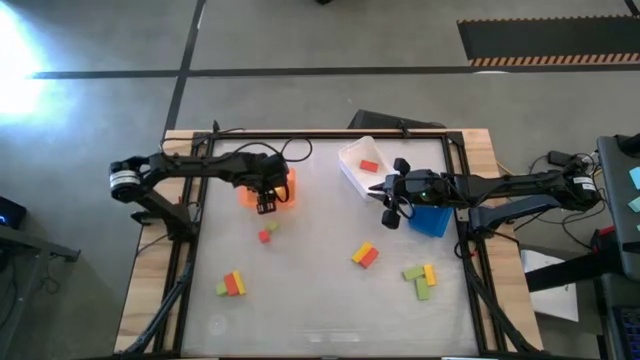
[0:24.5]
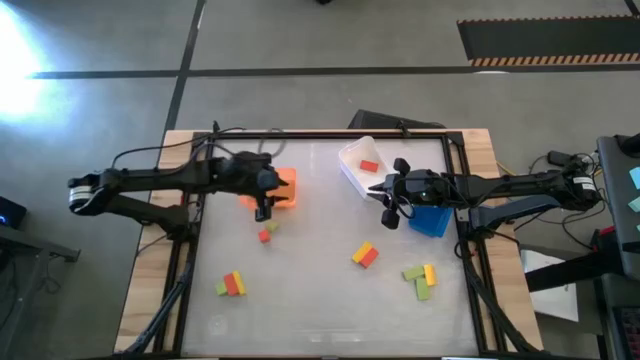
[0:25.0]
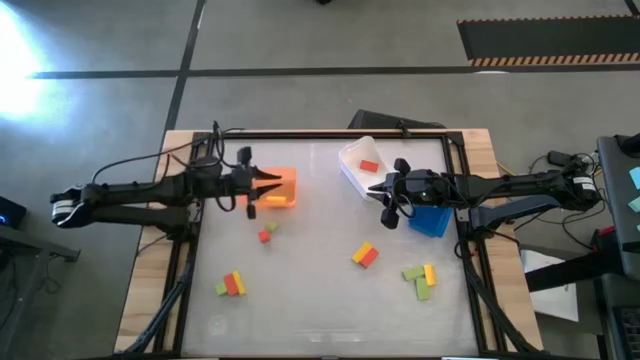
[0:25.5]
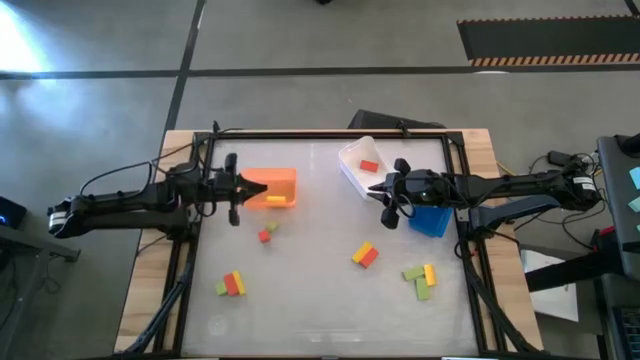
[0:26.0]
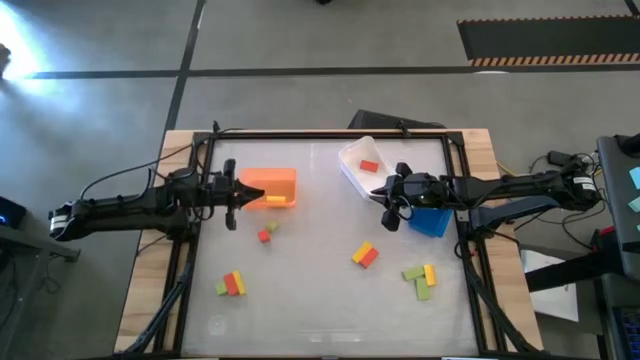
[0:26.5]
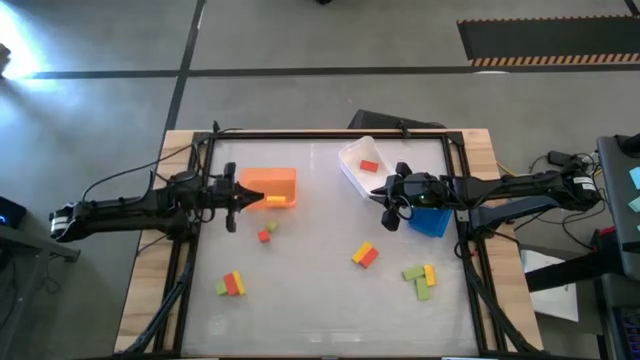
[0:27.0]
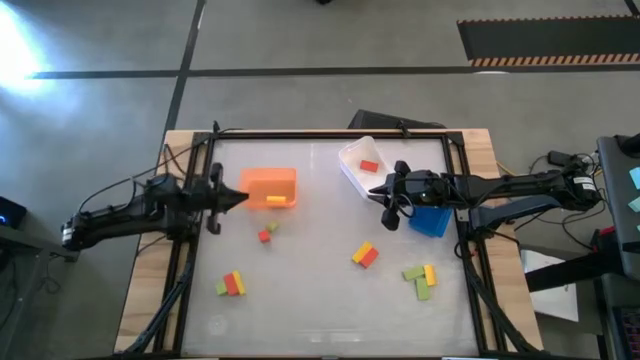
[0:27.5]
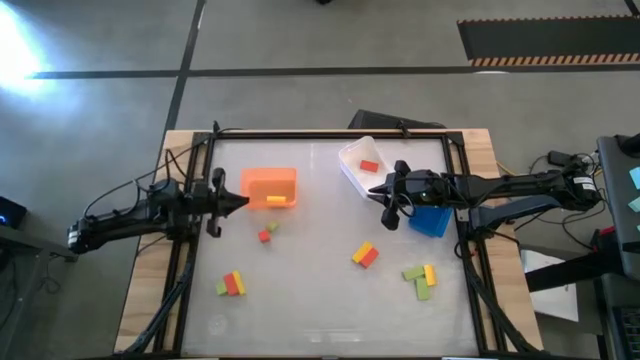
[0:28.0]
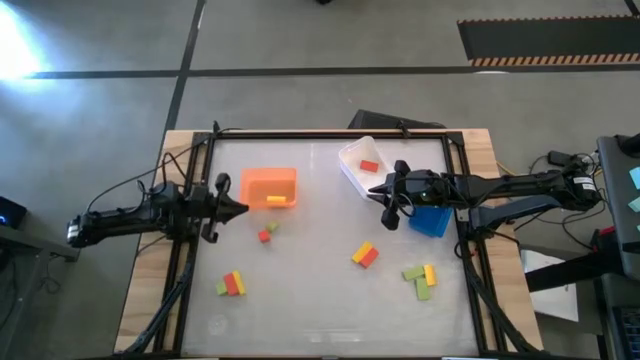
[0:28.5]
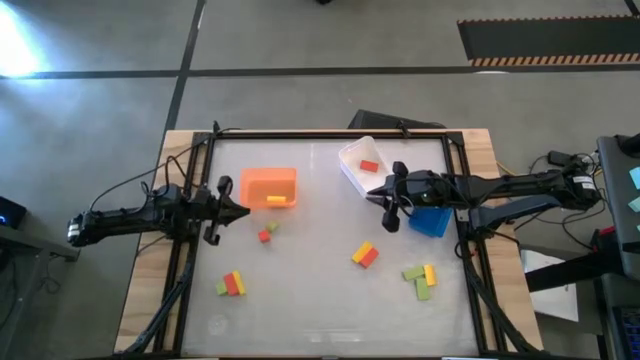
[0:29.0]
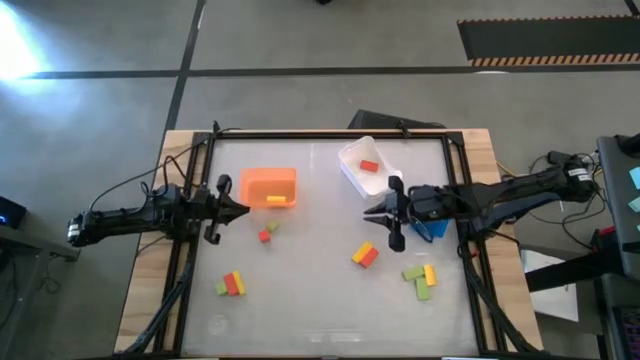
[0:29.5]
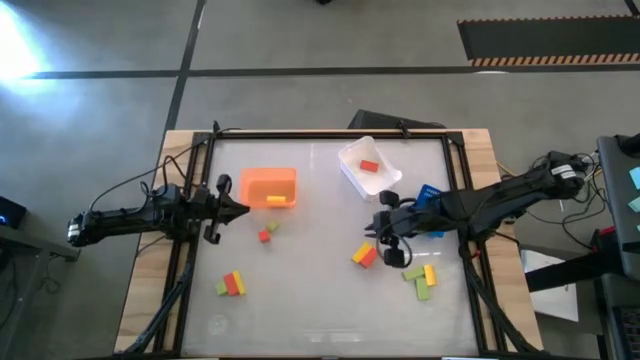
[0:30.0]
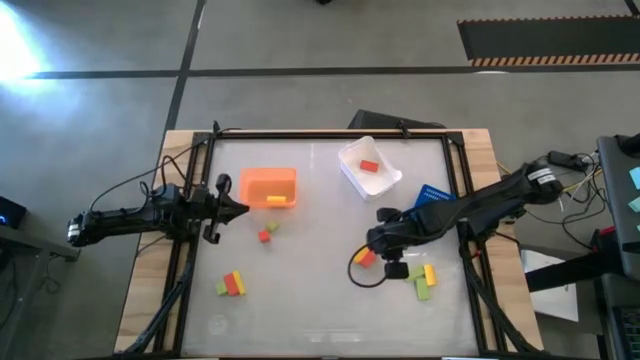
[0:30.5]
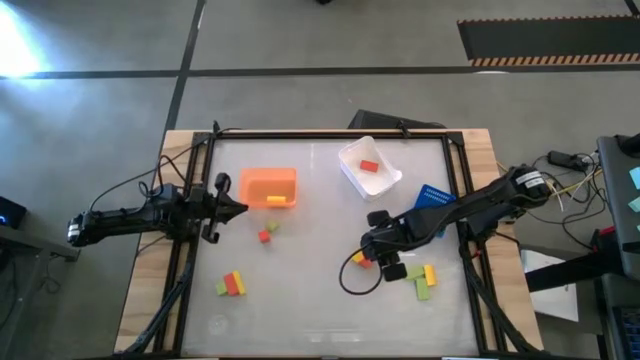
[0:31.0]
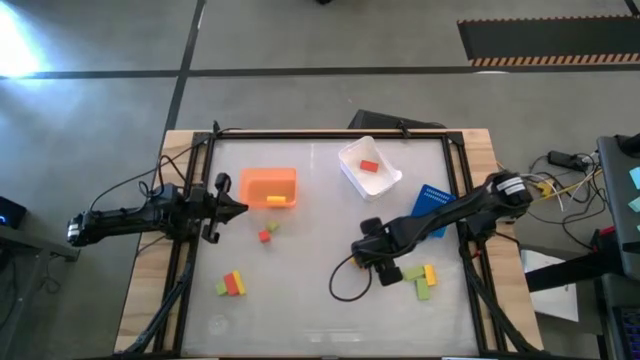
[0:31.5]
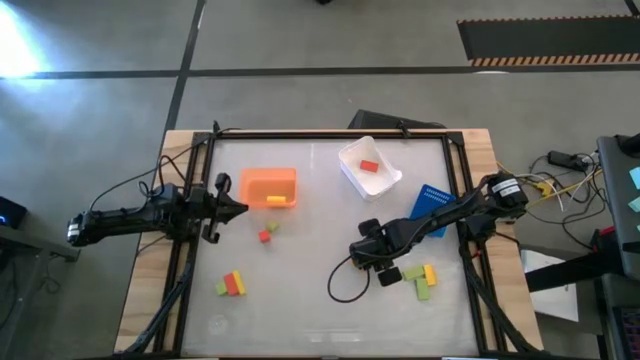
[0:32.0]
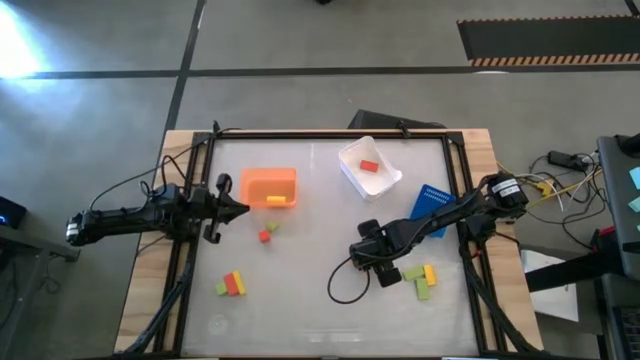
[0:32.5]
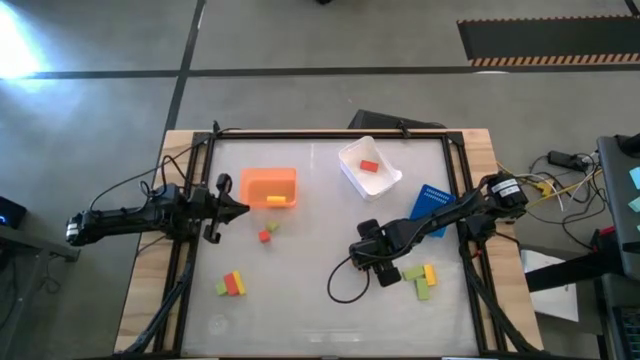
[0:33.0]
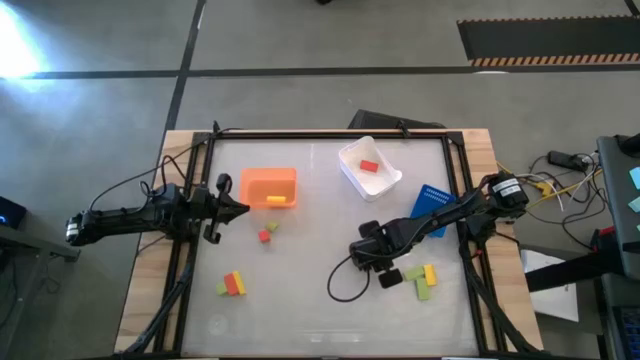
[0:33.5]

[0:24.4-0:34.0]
Task: Sort & place blocks by color
Put the orange block into the white bin

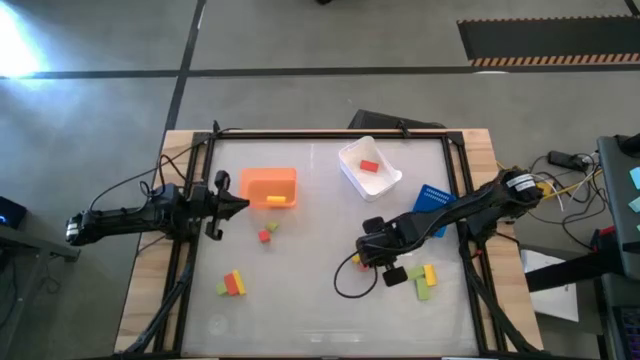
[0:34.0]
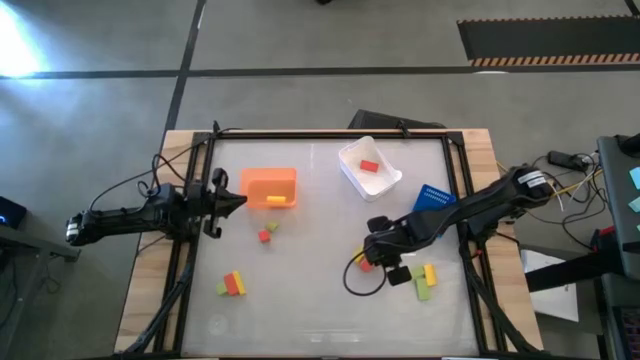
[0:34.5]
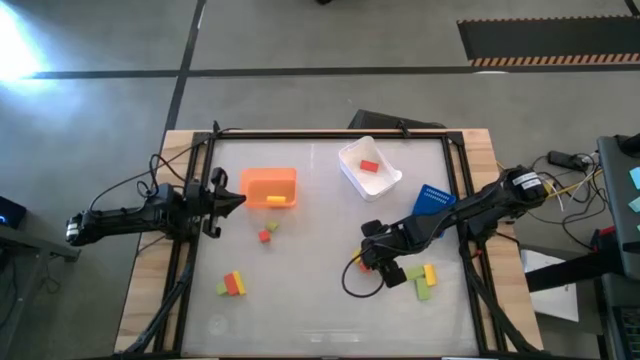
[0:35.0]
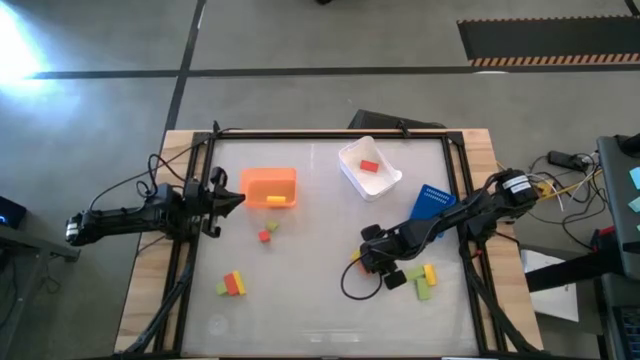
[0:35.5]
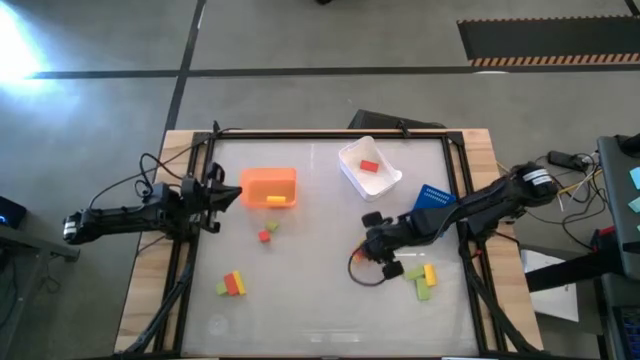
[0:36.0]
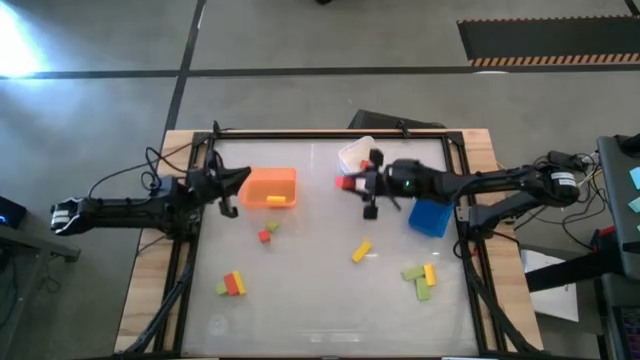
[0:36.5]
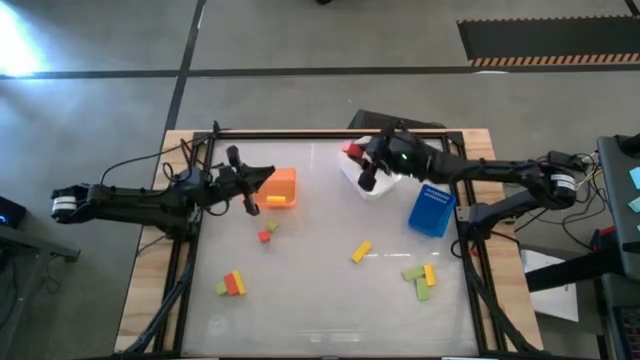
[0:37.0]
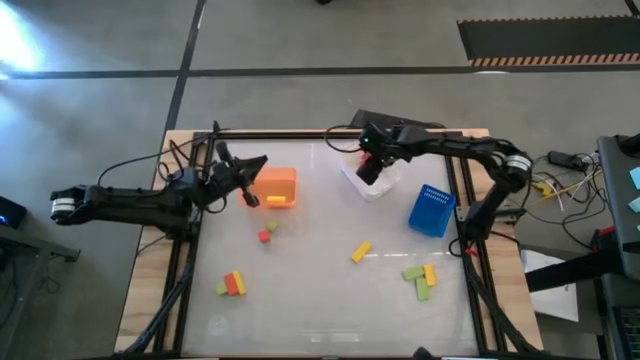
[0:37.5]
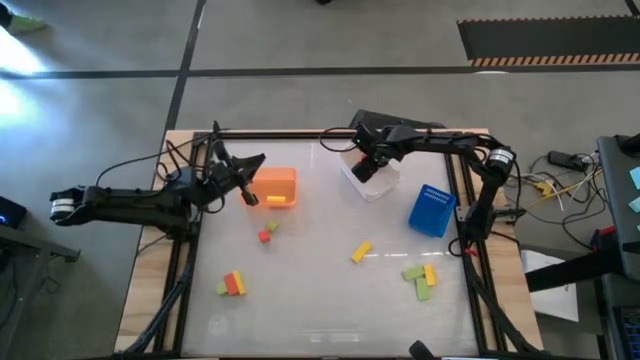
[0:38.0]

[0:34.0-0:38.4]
Put the orange block into the white bin

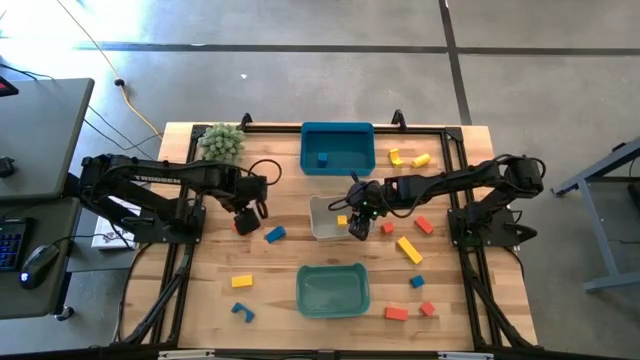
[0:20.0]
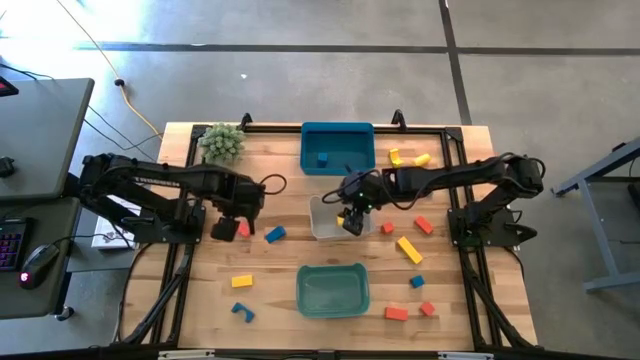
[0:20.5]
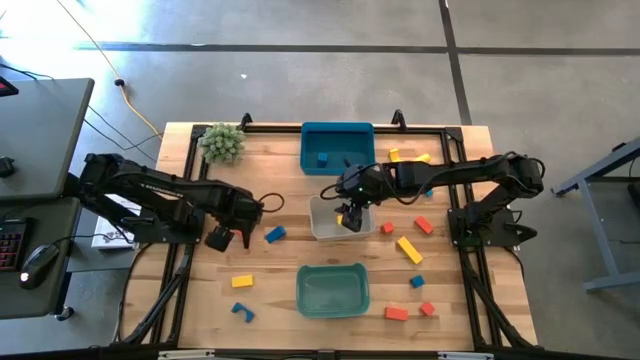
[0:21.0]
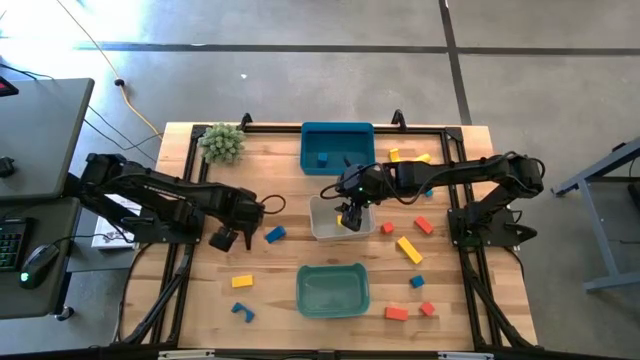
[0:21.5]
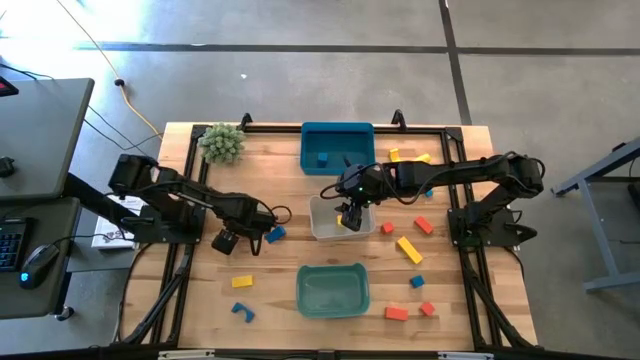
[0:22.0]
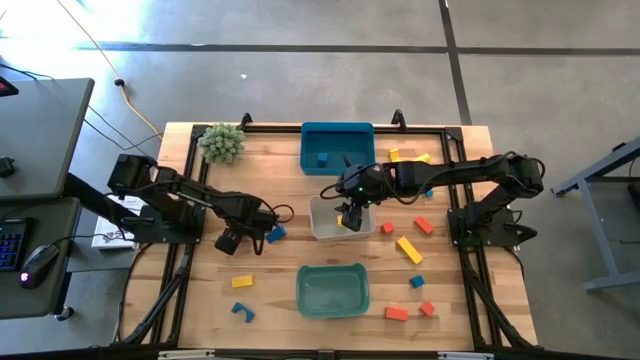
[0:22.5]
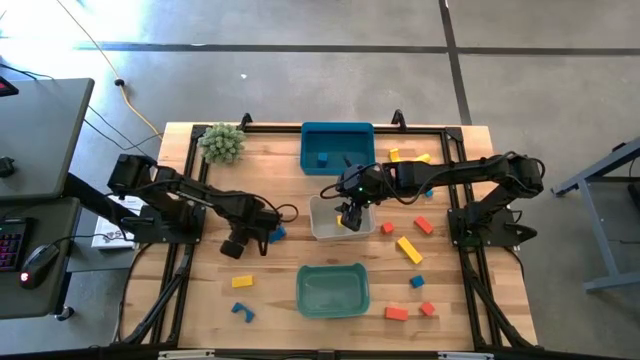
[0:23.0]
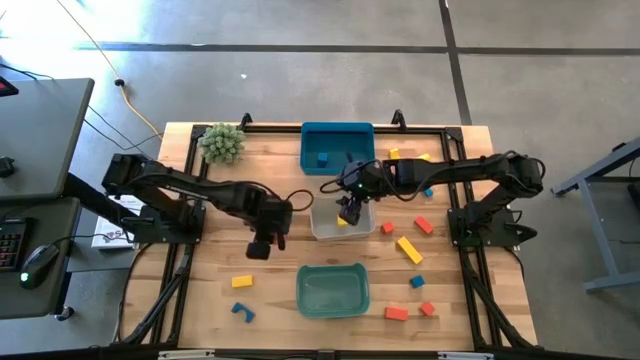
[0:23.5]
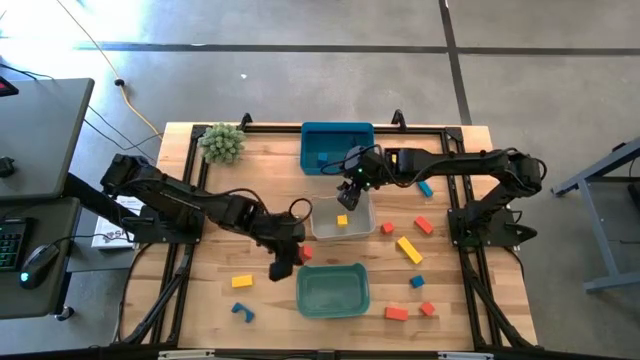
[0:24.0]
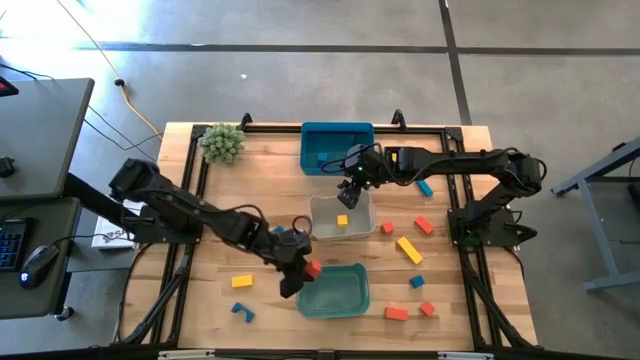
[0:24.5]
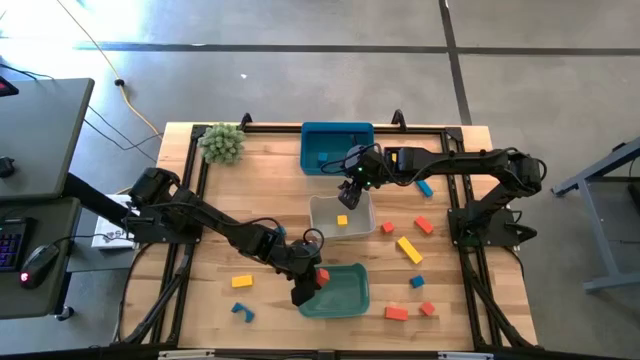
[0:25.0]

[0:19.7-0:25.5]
Task: Sort & place blocks by color
Put the orange block into the green bin
